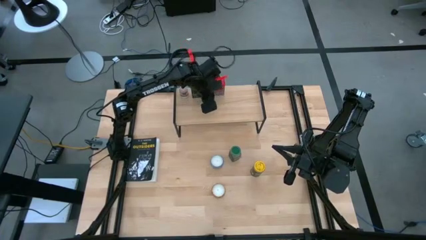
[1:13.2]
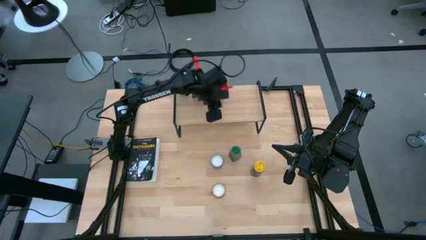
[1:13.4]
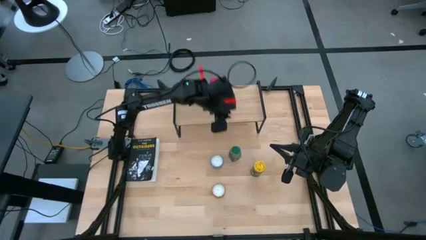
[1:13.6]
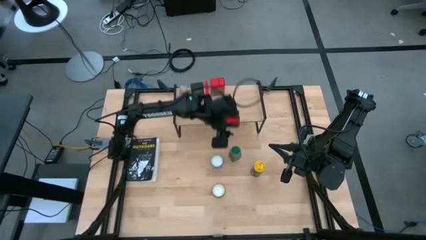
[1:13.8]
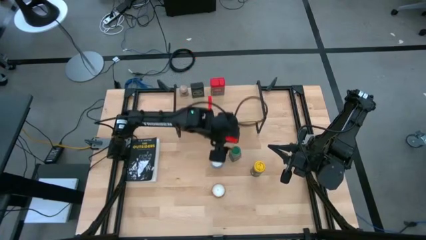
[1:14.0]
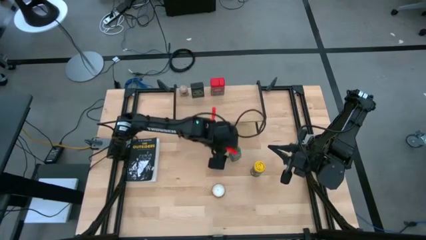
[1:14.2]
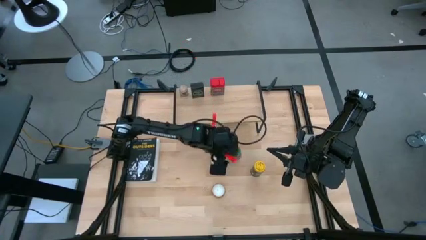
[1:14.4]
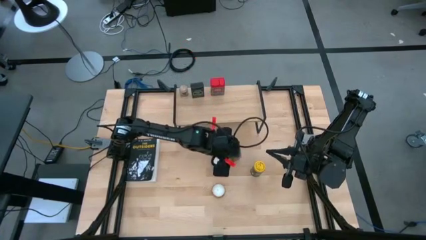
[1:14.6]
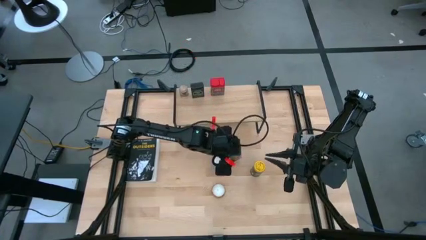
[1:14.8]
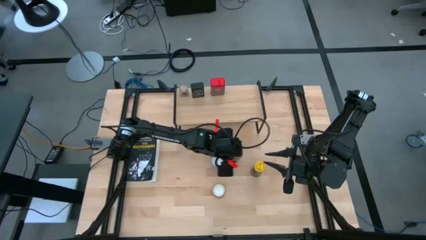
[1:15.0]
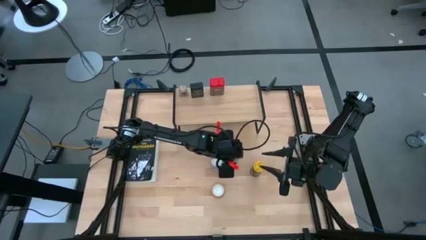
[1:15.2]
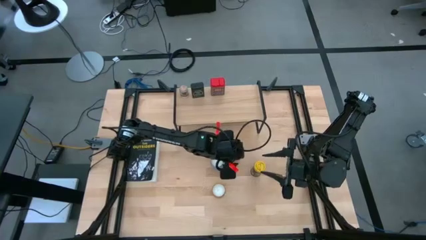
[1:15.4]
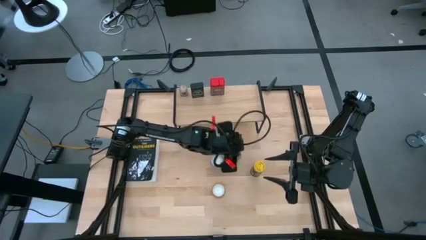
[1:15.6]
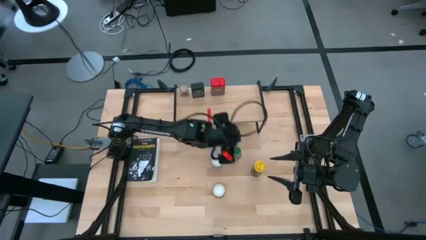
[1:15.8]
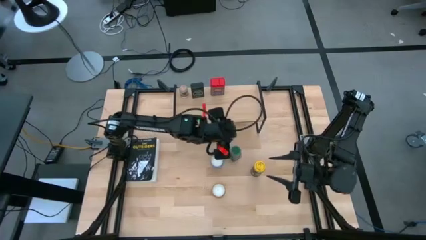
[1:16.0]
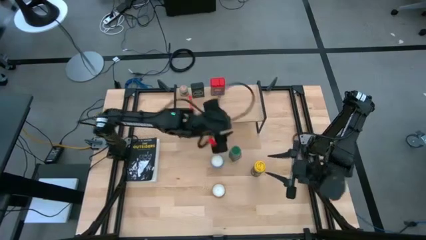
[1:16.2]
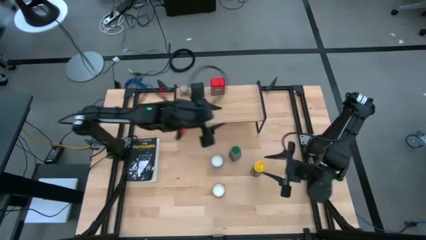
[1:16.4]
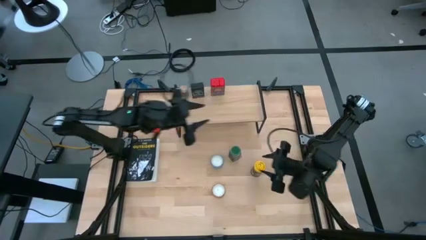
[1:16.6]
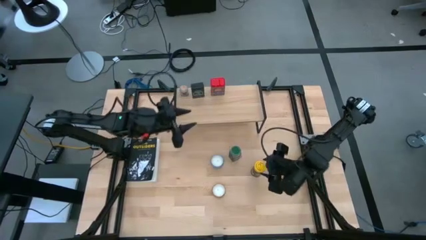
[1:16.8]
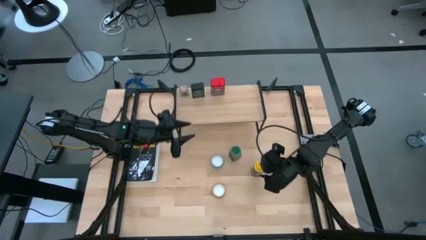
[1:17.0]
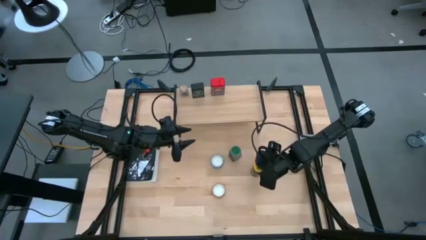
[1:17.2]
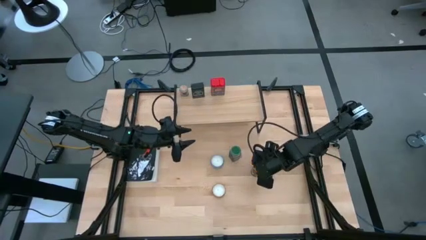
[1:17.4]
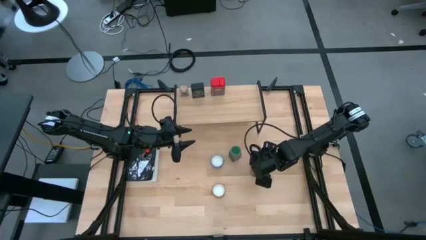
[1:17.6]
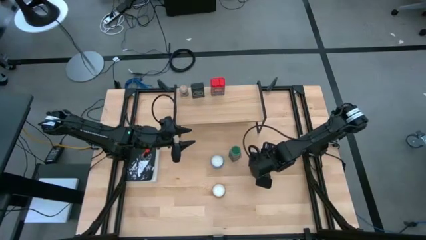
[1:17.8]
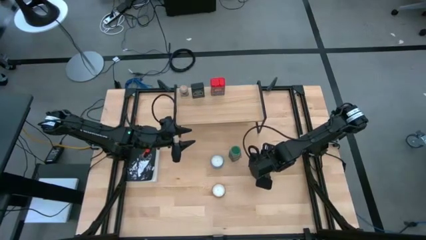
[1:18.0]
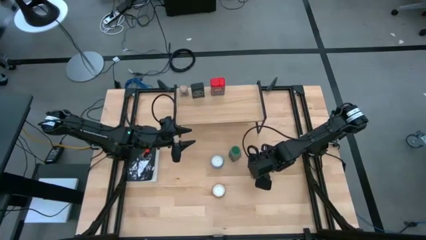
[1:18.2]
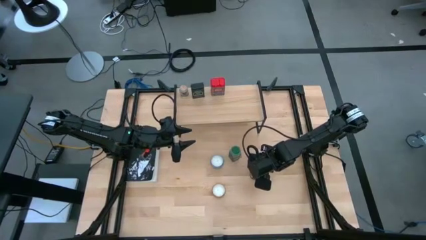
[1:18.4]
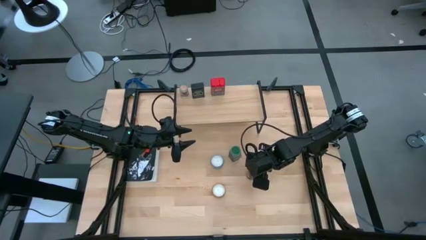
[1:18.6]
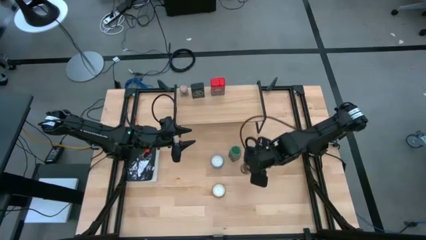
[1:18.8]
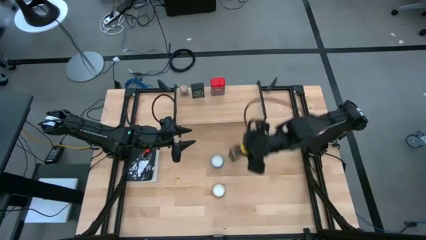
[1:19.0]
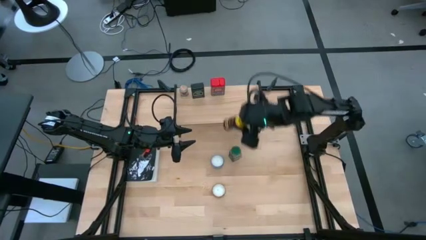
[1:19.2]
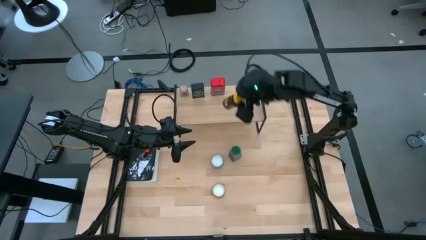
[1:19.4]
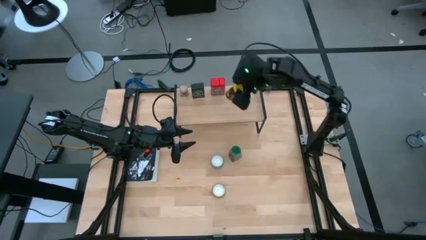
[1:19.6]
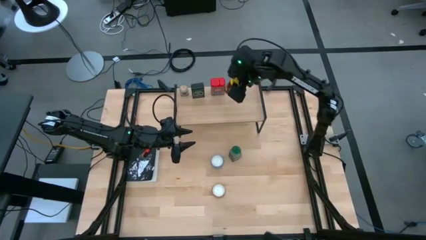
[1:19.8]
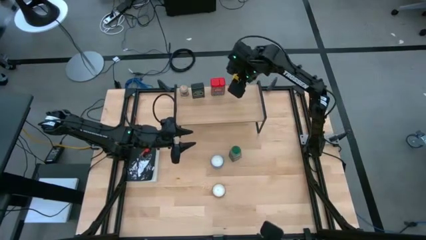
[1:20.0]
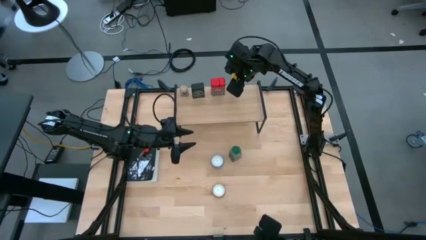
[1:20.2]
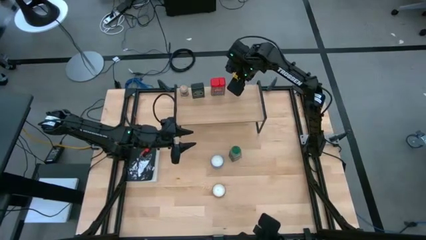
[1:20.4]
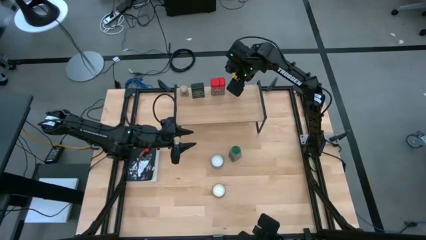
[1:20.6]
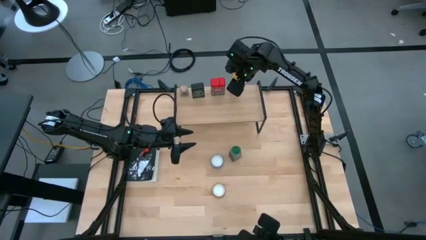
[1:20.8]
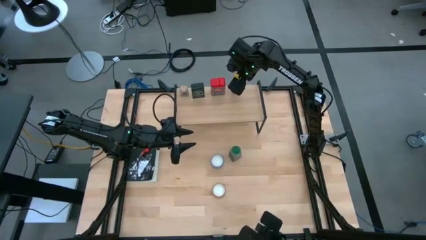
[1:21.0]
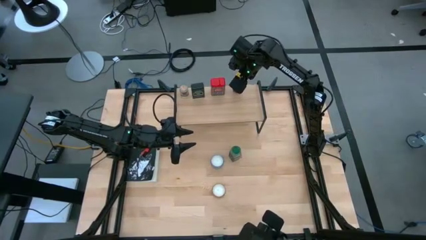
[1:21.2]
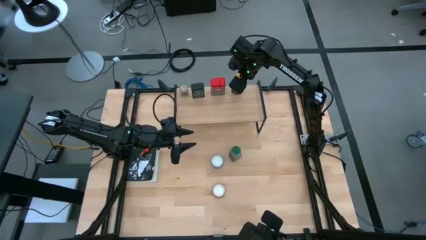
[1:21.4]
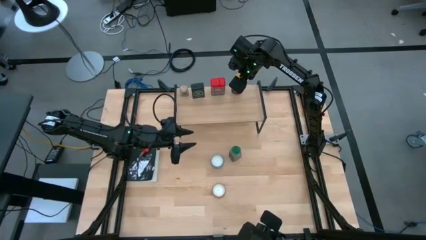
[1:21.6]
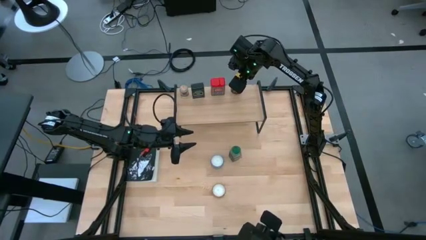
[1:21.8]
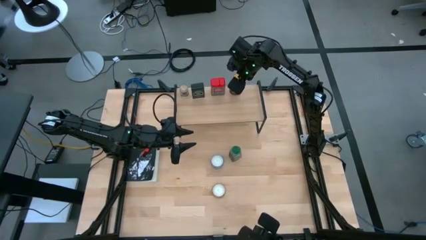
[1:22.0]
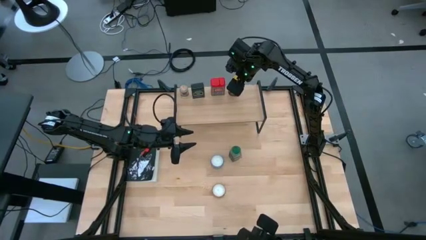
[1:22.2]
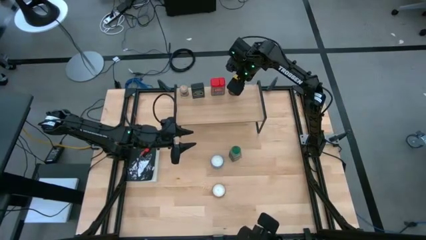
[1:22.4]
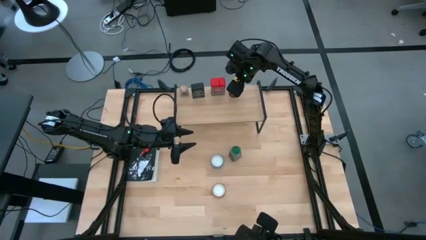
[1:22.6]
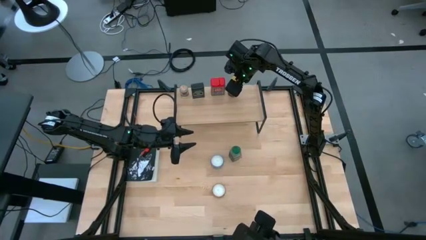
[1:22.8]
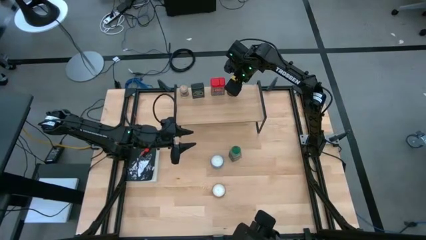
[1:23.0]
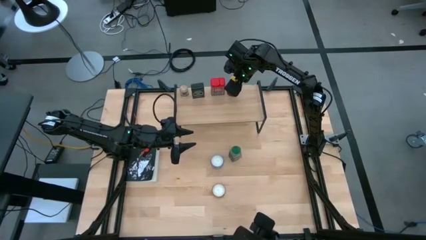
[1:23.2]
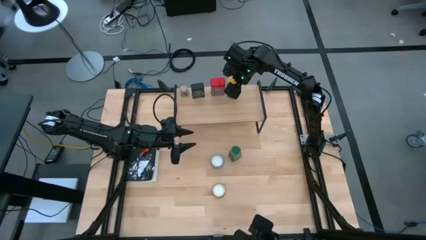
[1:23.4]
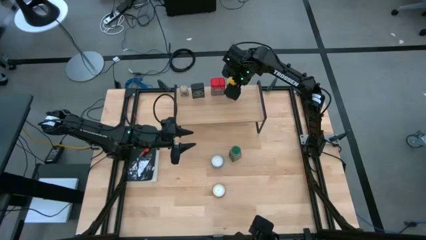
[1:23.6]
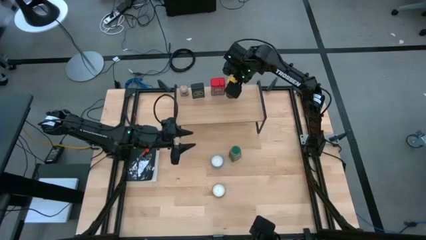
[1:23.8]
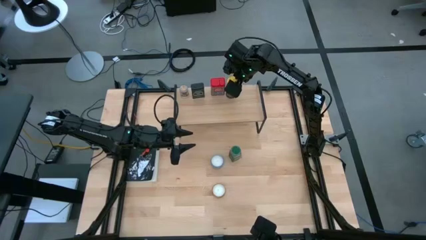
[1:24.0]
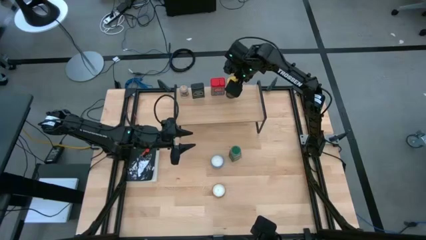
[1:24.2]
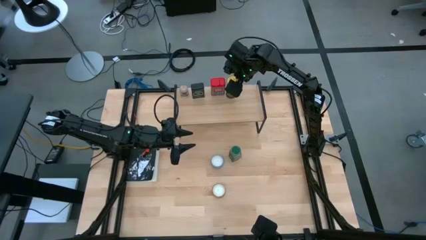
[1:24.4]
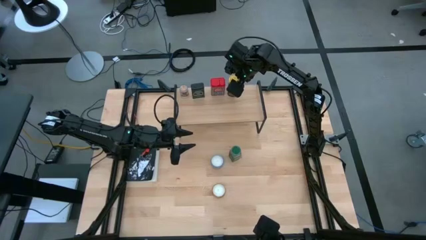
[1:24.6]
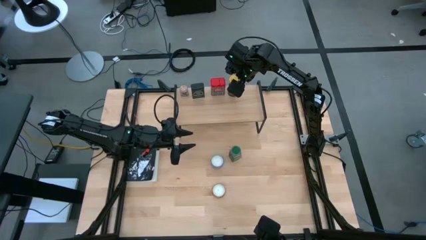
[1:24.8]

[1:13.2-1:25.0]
Task: Shelf spices
Put the yellow seasoning bottle on the shelf
